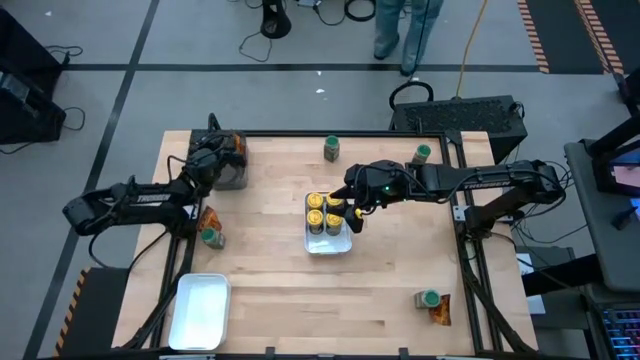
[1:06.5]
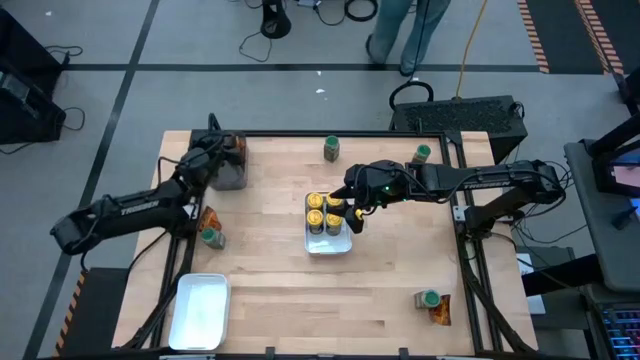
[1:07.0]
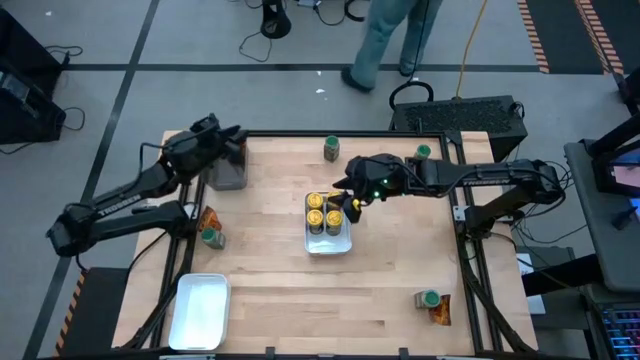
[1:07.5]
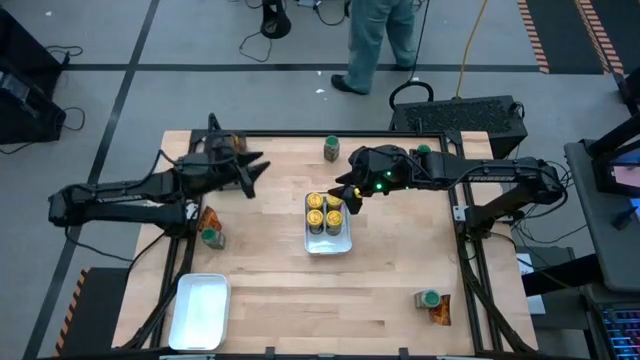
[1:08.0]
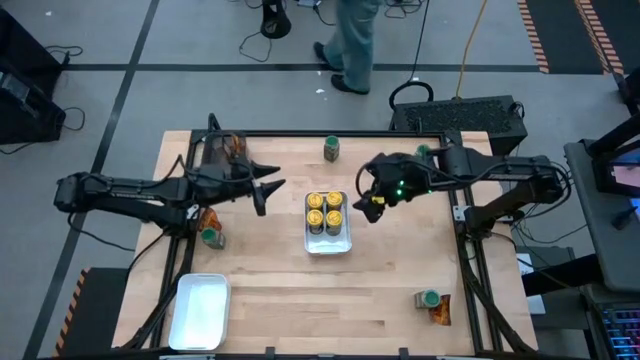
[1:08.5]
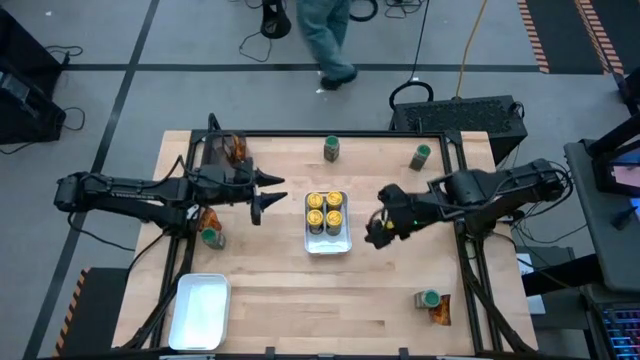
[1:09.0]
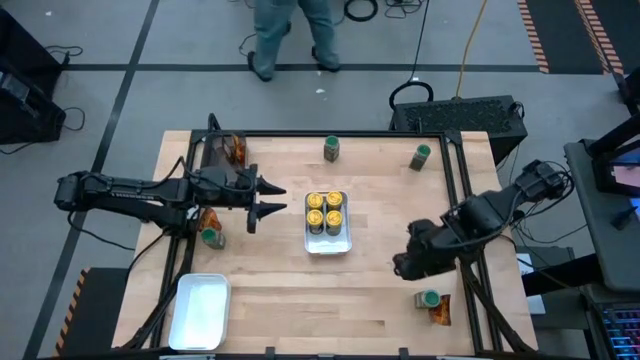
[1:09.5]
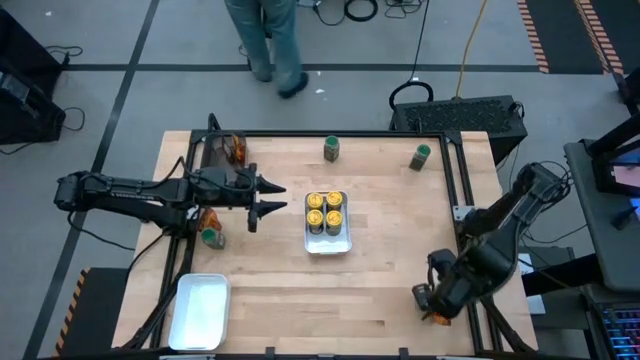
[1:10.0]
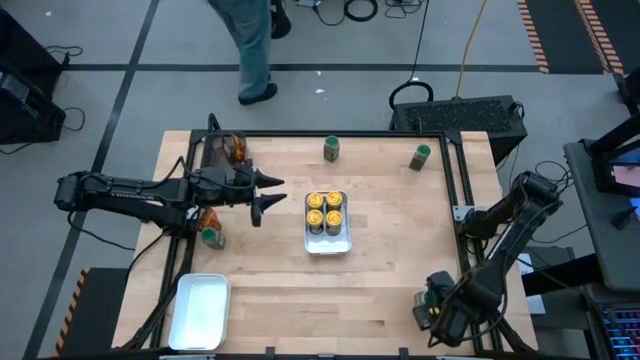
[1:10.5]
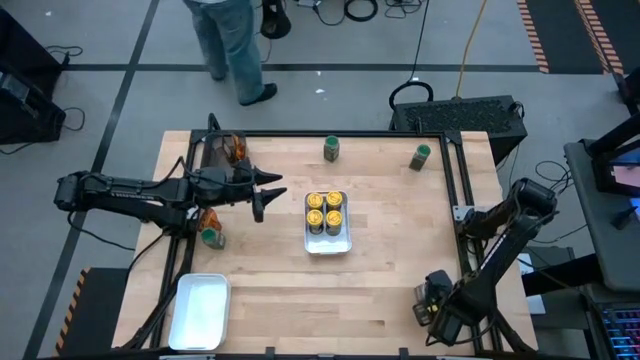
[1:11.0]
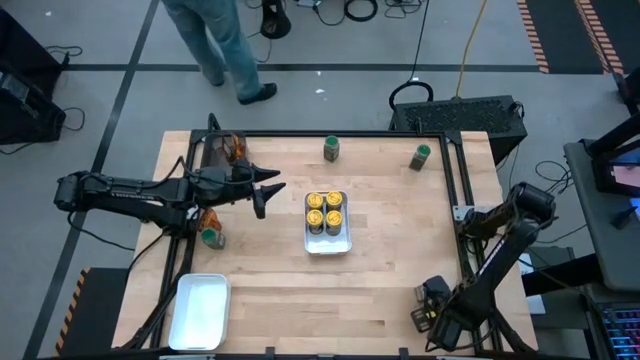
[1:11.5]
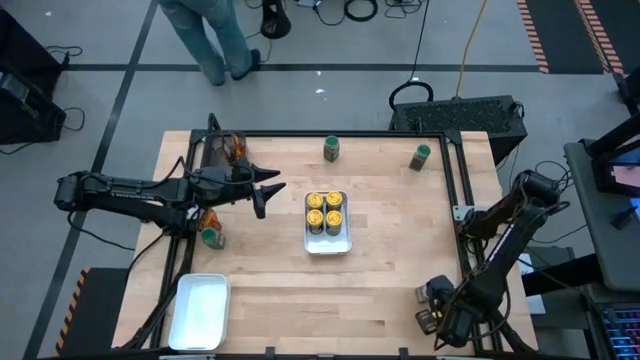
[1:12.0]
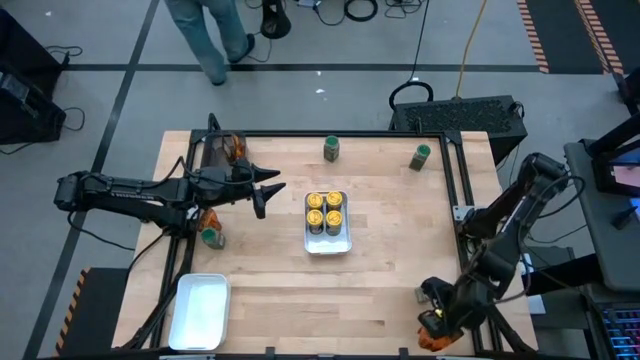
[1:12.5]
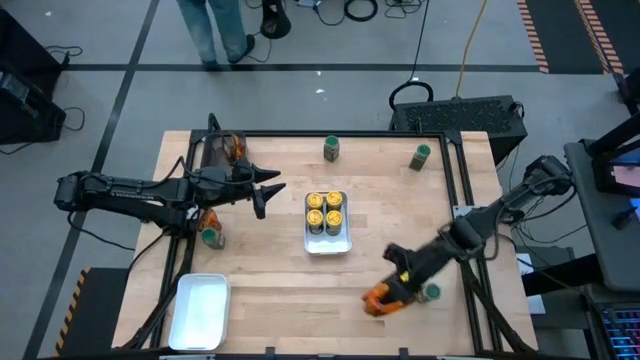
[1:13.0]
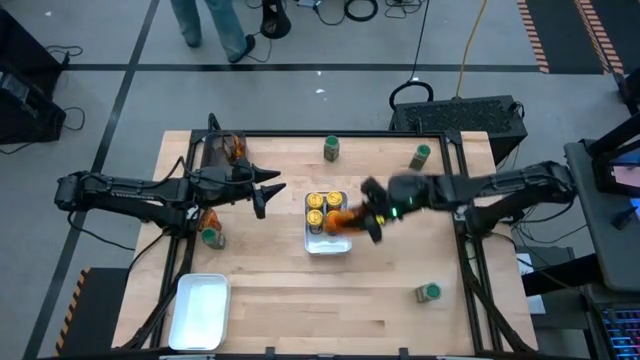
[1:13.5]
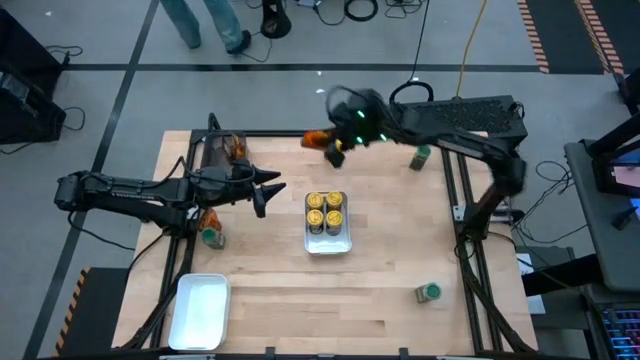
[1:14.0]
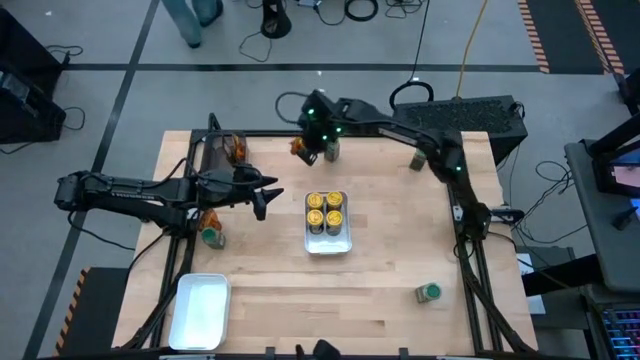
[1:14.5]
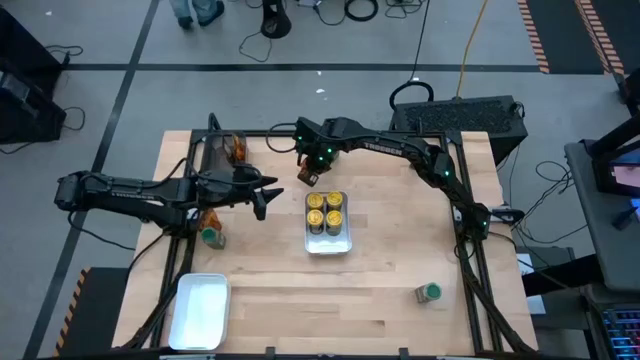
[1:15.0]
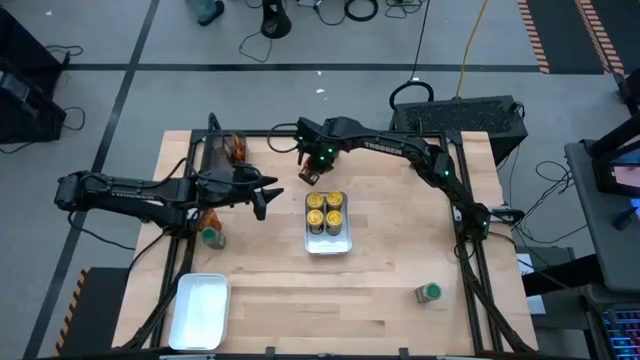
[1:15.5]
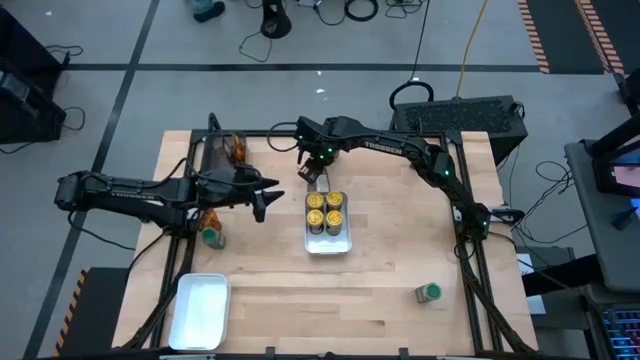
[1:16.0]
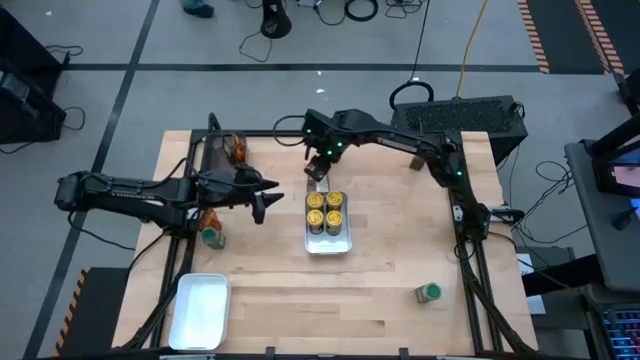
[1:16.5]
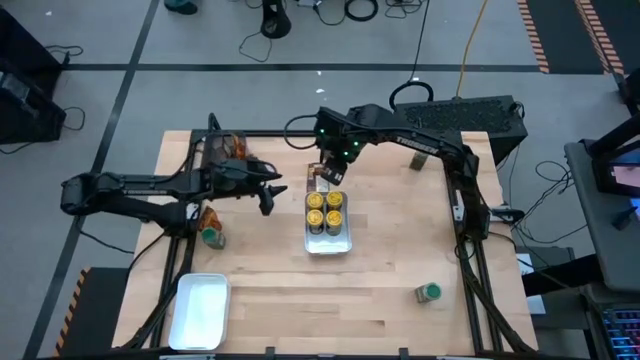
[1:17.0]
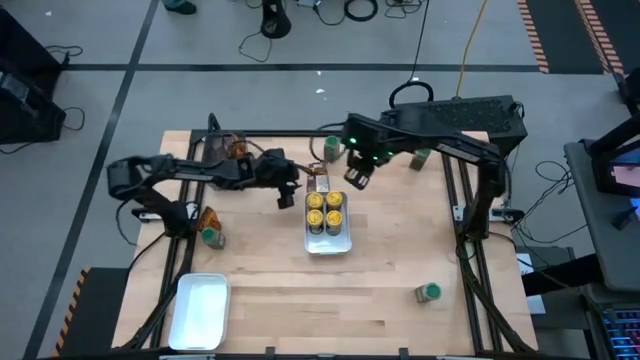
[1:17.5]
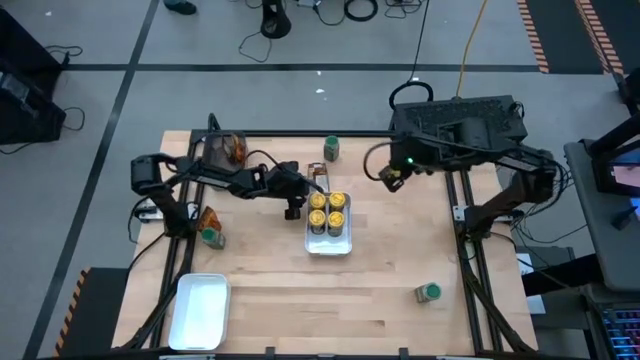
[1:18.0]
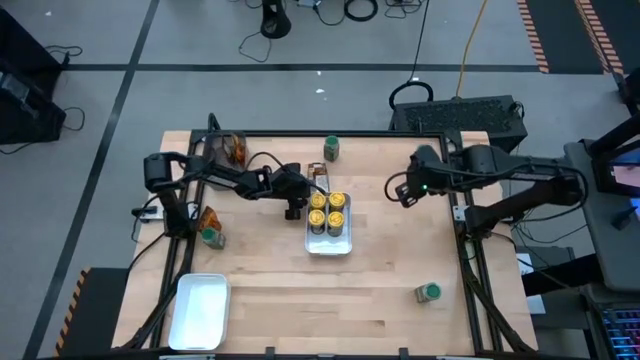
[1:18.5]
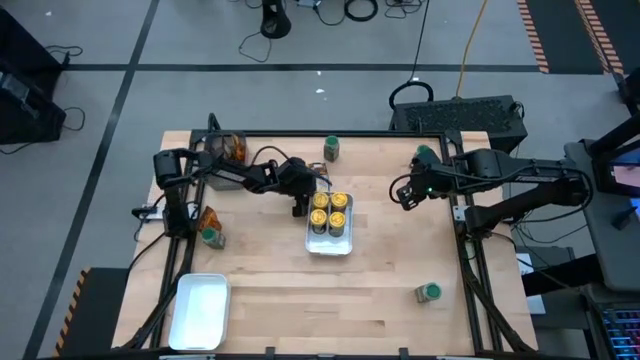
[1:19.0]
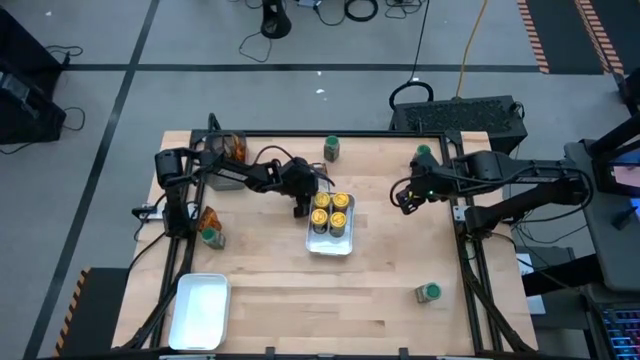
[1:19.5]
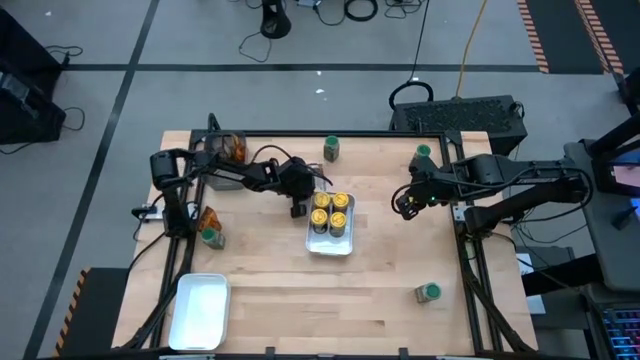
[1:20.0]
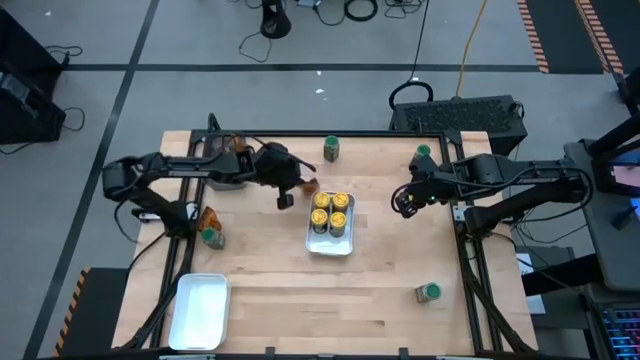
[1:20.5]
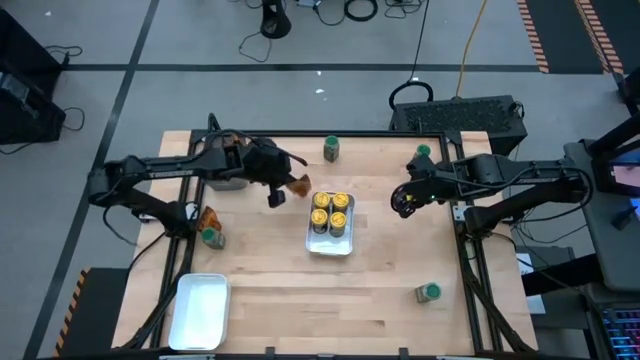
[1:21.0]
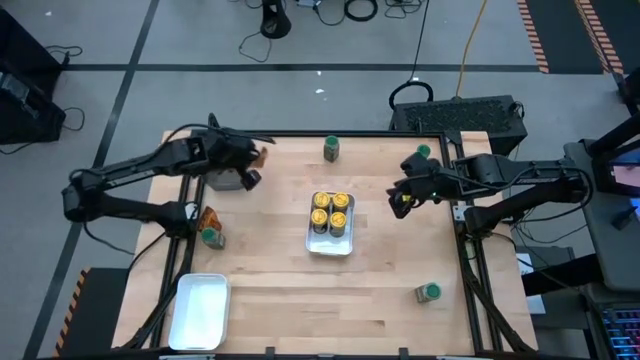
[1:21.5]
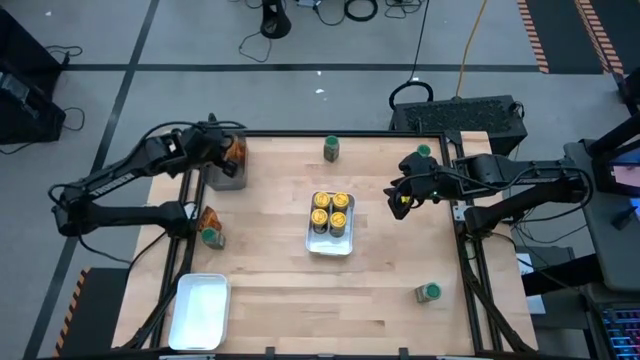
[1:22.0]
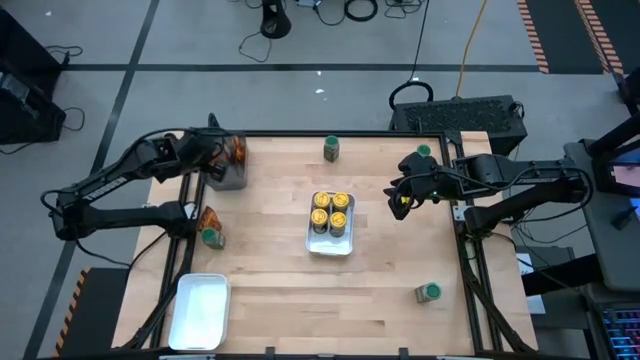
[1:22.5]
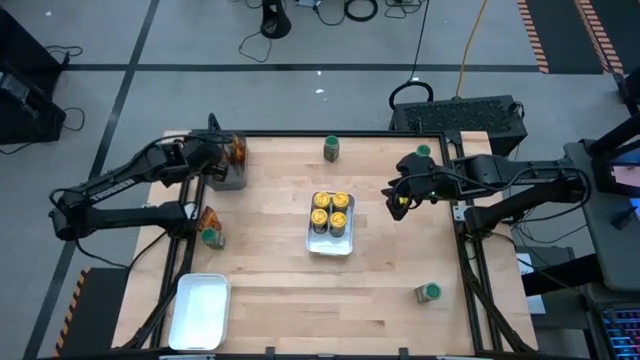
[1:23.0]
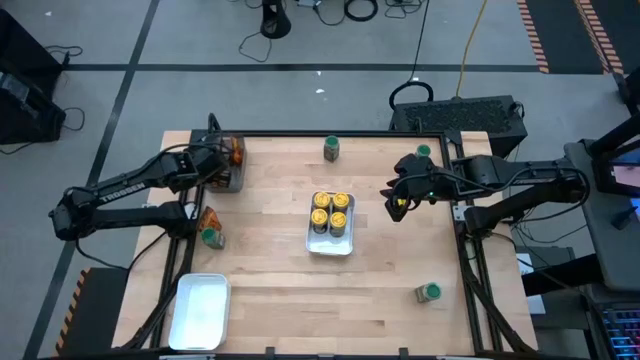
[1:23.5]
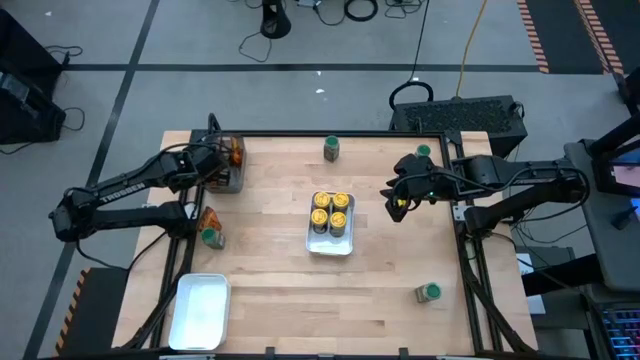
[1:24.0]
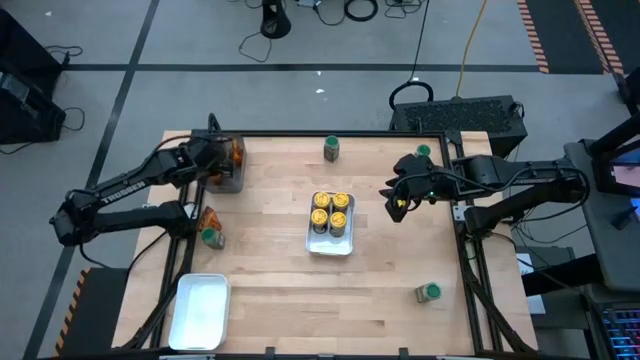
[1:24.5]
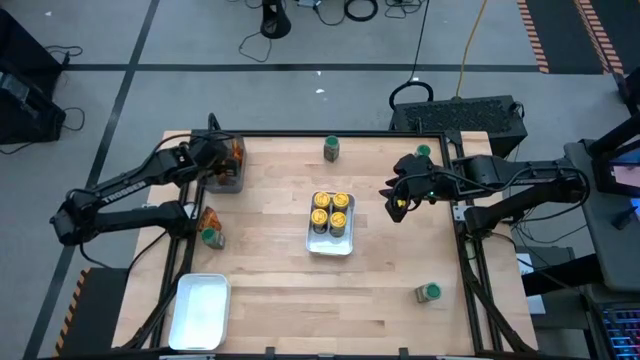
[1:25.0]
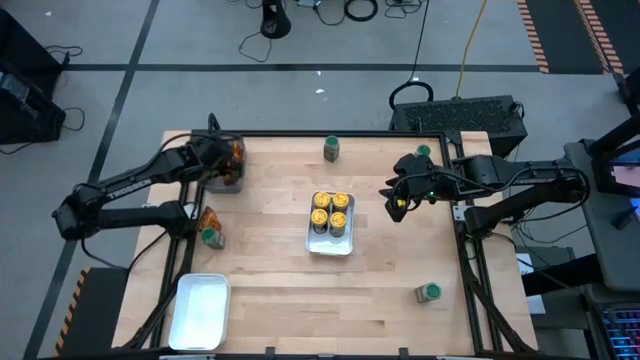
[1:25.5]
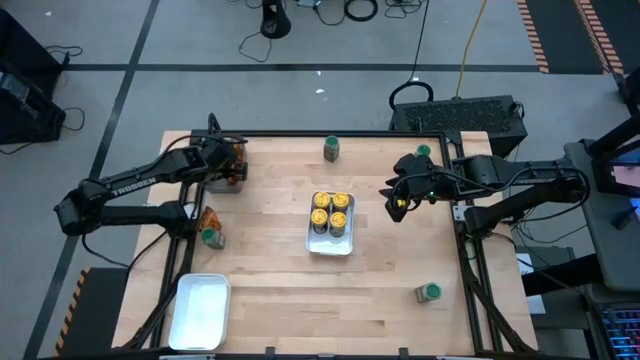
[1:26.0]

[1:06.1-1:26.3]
Task: Sort spices by type
Put the right brown spice pouch into the black transparent bin
